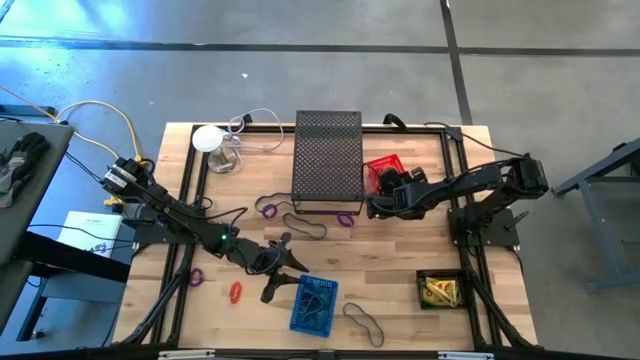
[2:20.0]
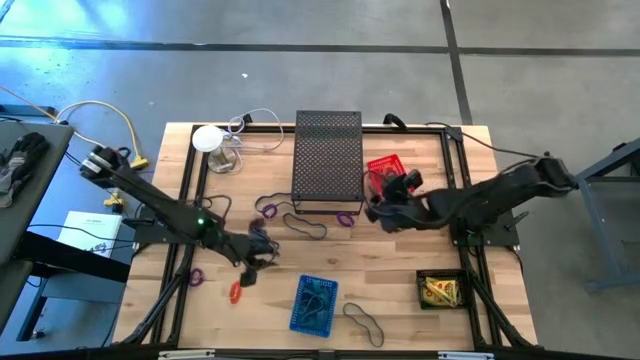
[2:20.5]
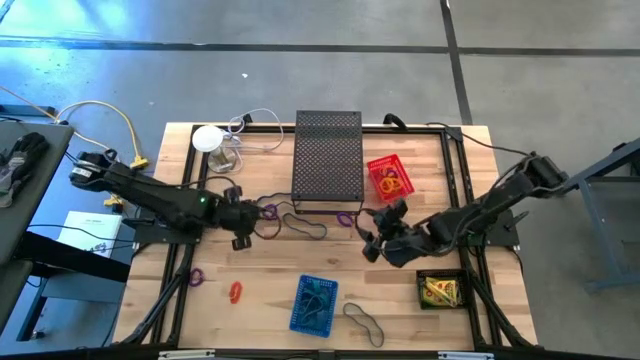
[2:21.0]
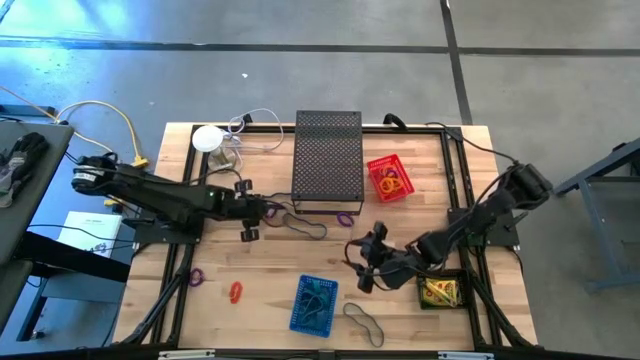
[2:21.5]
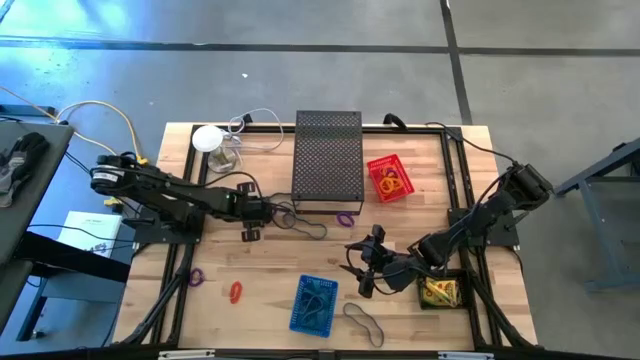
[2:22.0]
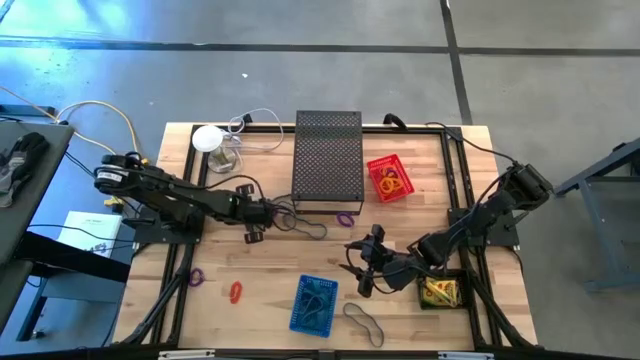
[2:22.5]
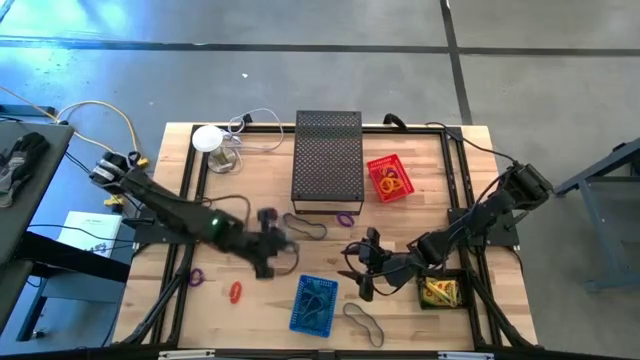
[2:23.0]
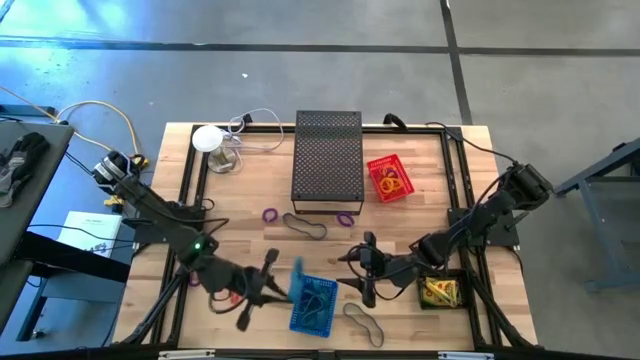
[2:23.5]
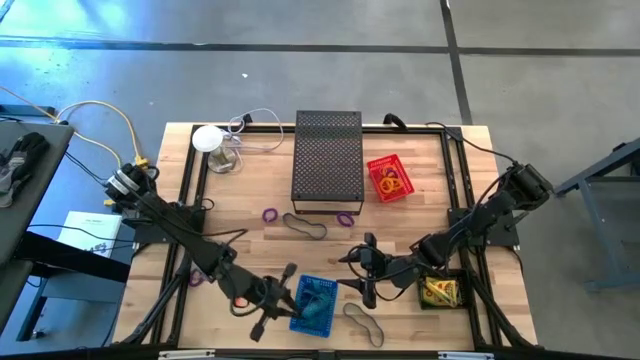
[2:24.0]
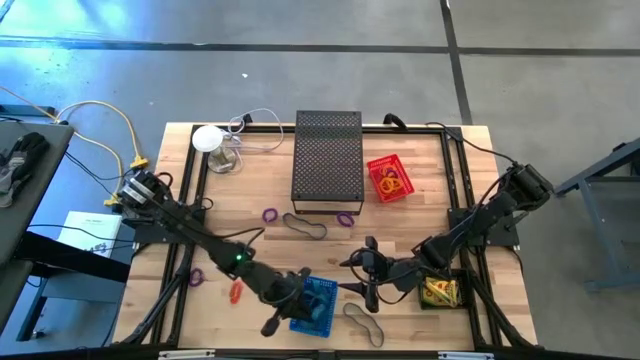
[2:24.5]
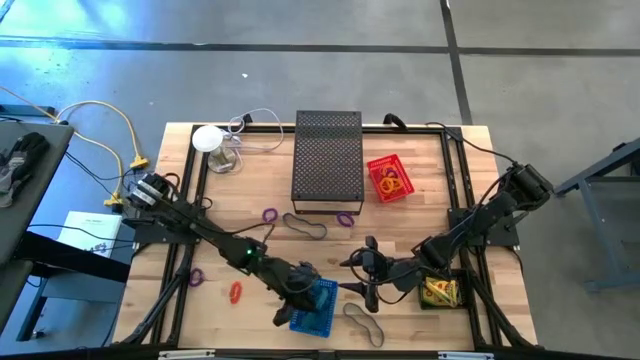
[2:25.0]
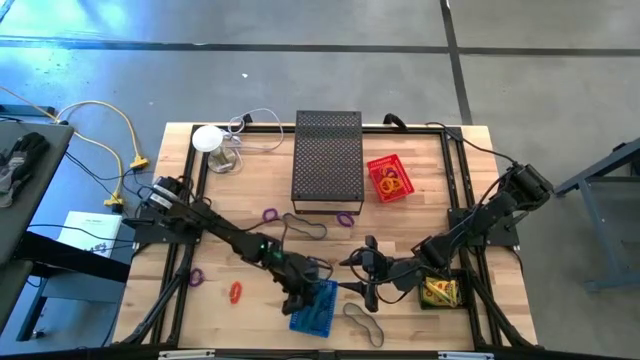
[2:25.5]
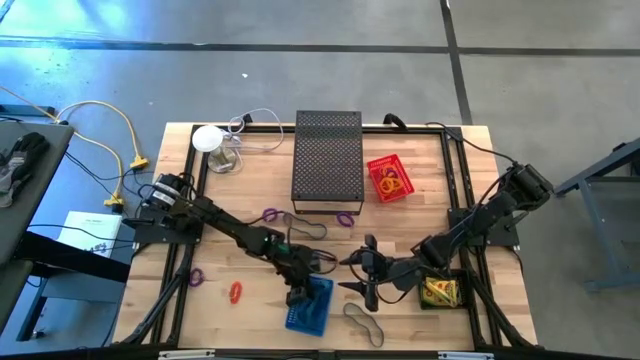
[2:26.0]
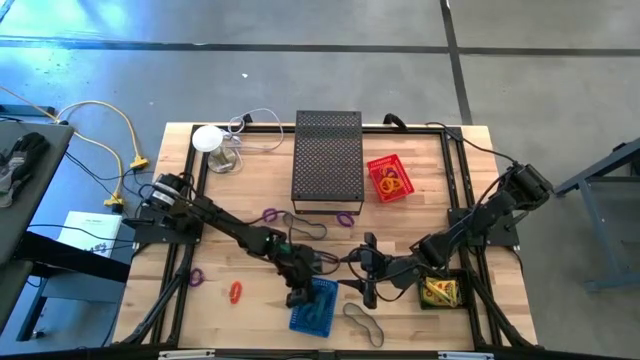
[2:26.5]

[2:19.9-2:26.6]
Task: Pick & Place Office Desk Supplies
Put the blue rubber band into the blue bin

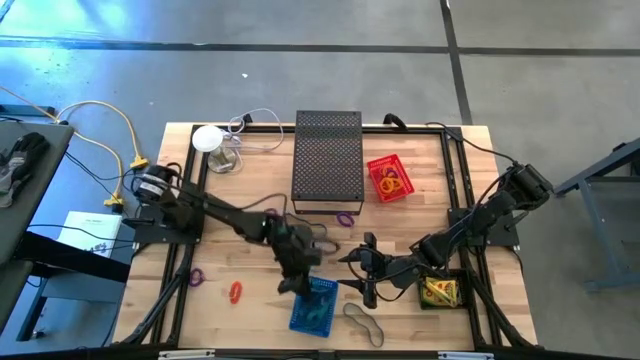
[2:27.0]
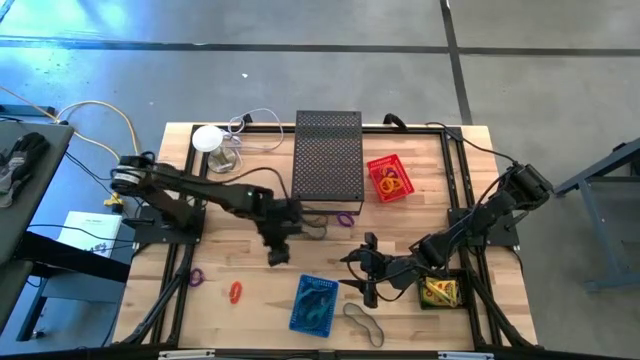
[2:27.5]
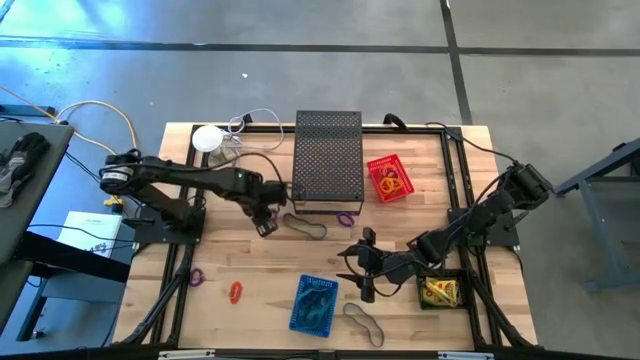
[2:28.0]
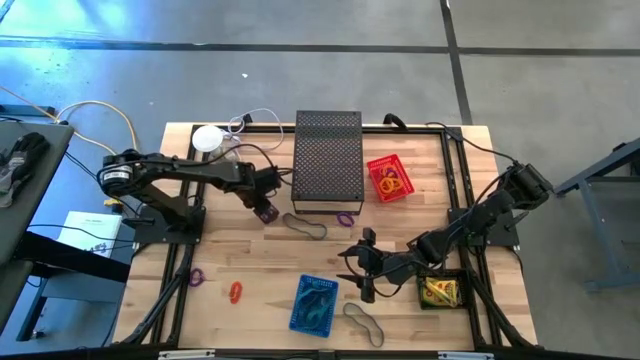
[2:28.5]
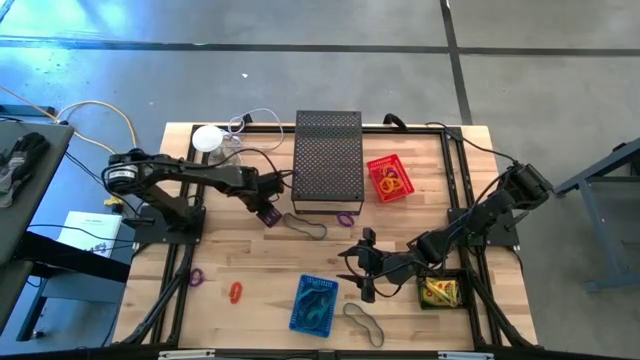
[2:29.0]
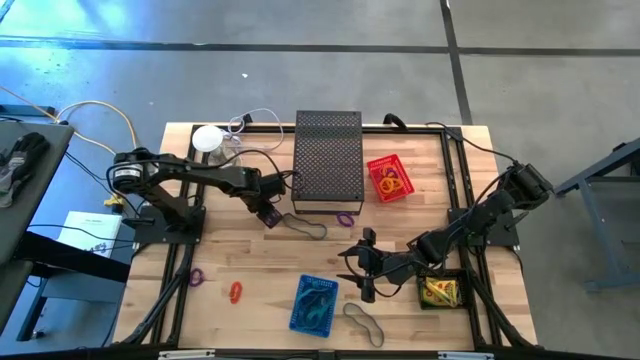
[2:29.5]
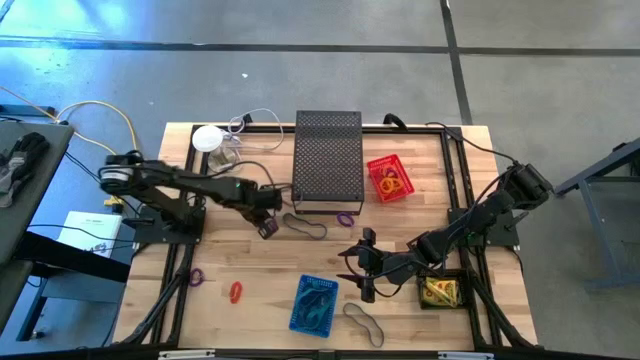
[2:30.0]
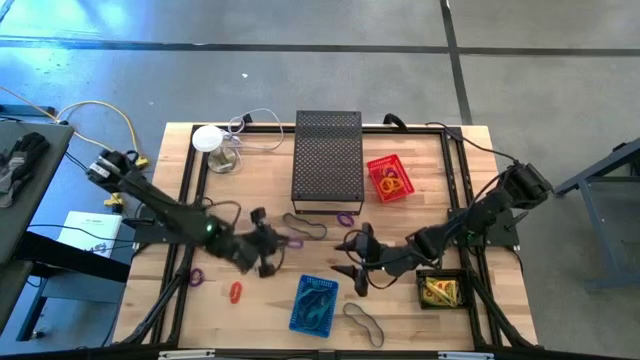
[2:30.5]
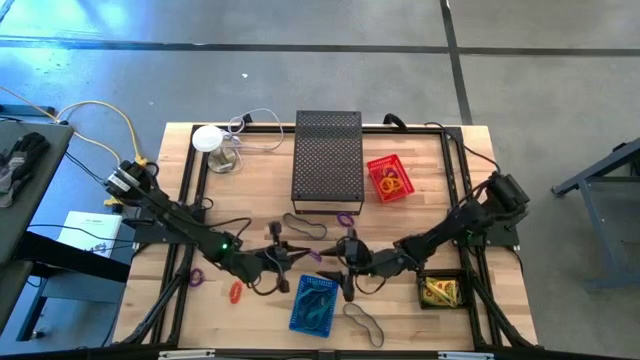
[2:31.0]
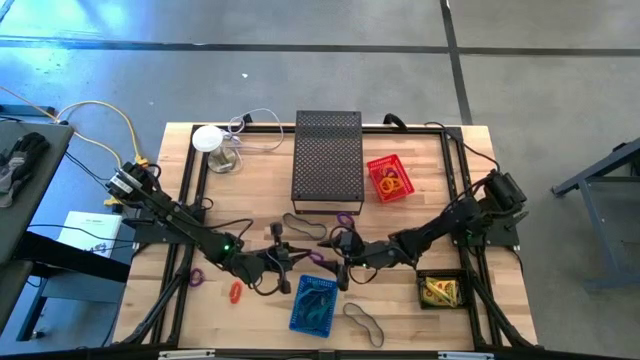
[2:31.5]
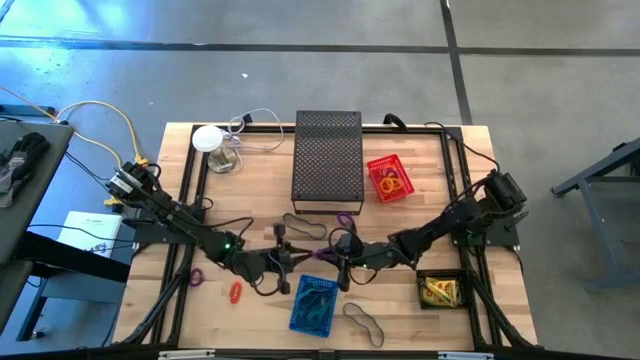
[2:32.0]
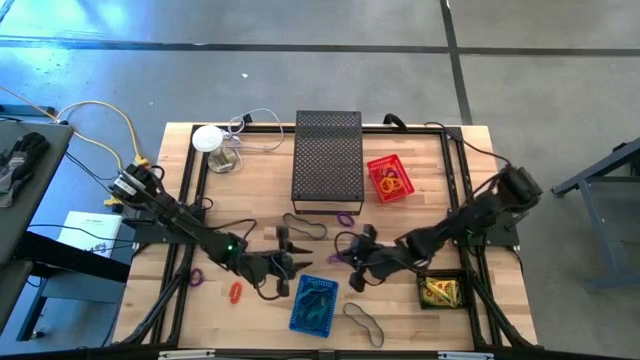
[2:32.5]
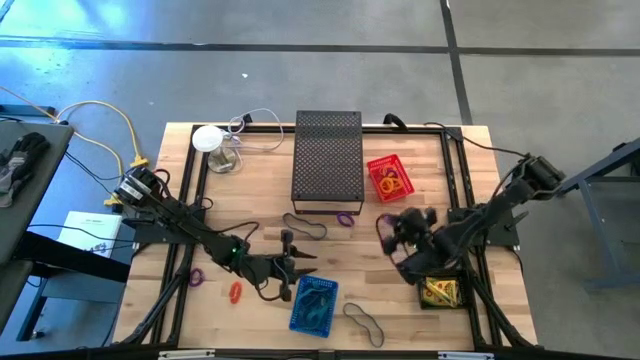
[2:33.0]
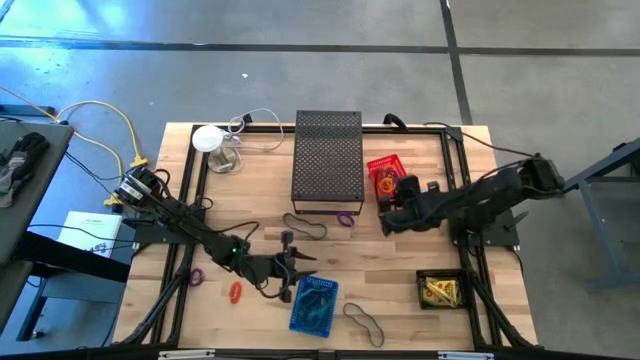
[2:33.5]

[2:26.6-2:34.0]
Put the violet spring keychain into the red bin

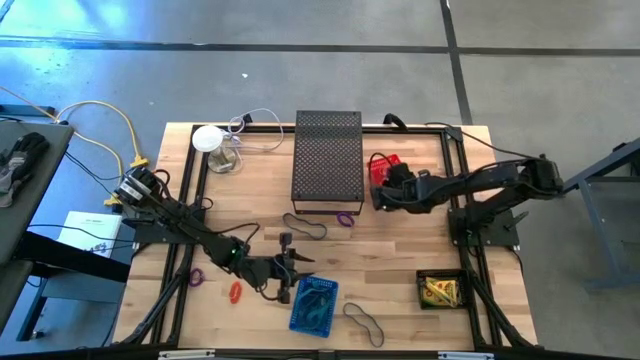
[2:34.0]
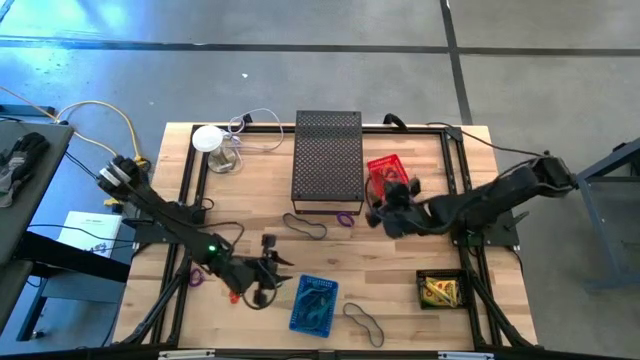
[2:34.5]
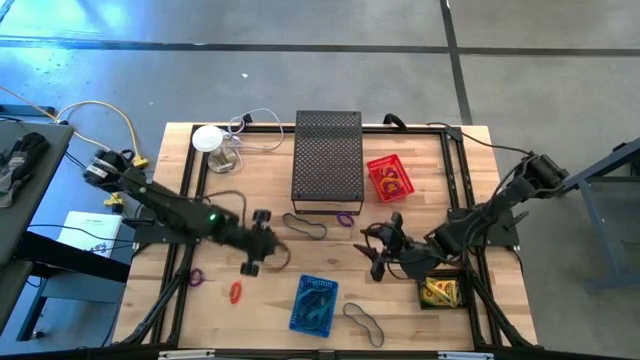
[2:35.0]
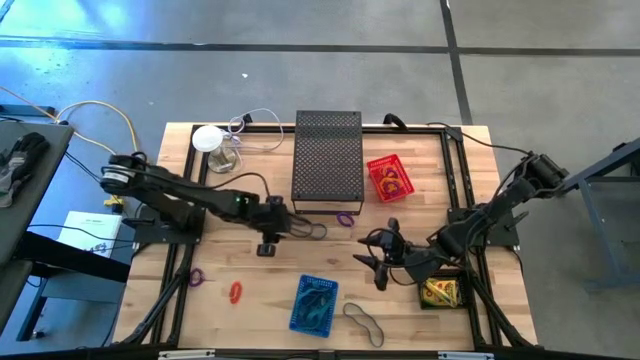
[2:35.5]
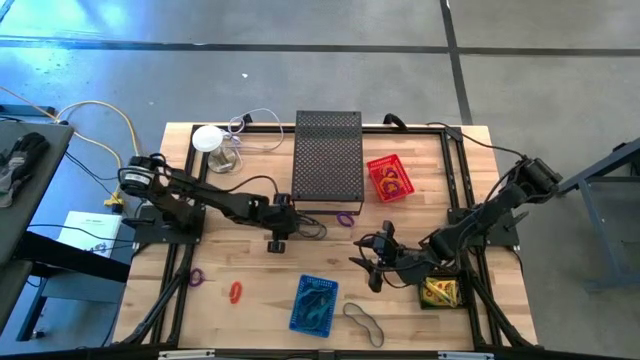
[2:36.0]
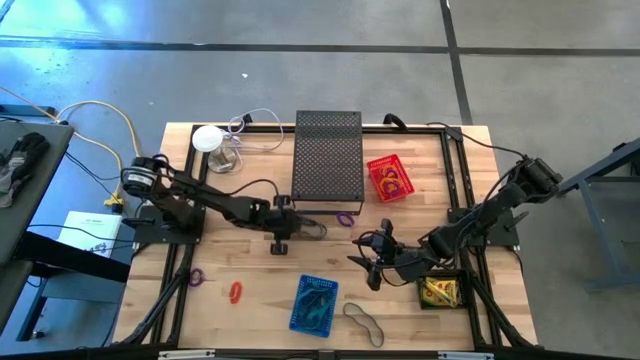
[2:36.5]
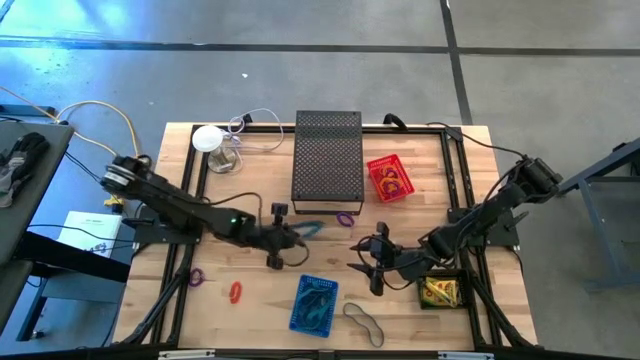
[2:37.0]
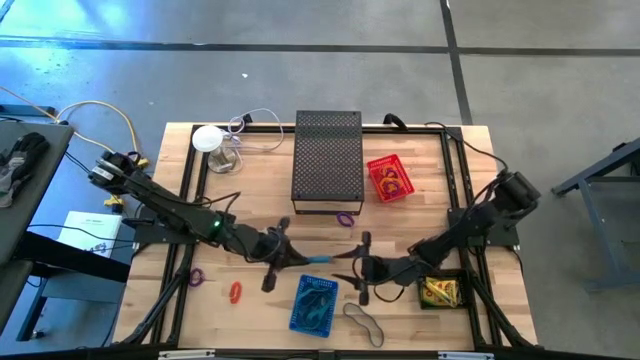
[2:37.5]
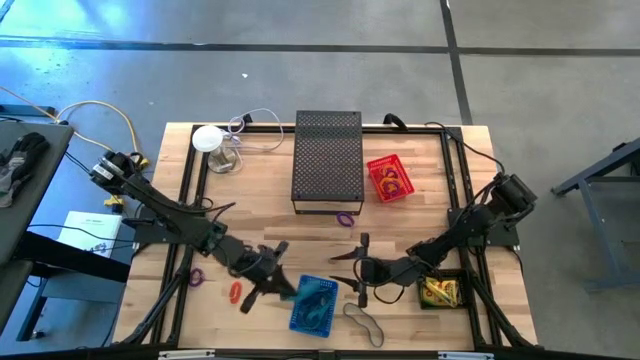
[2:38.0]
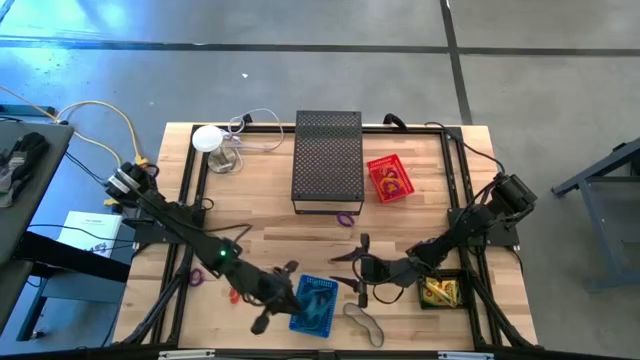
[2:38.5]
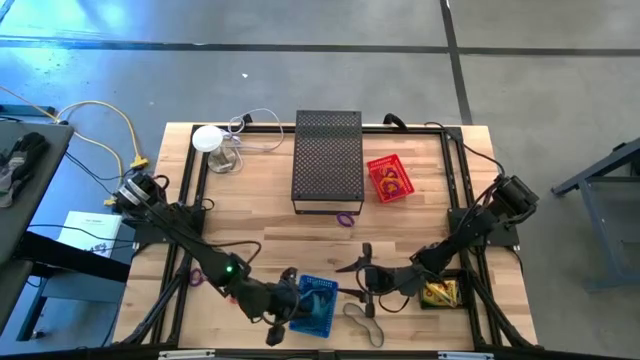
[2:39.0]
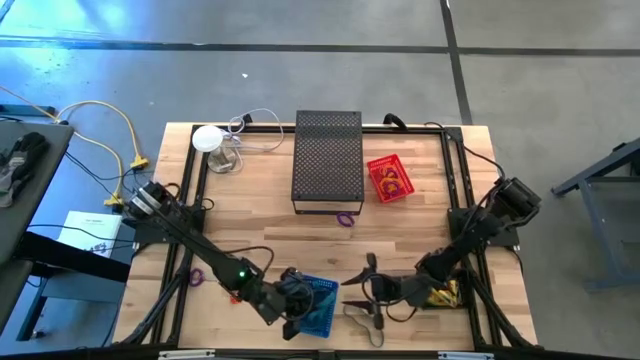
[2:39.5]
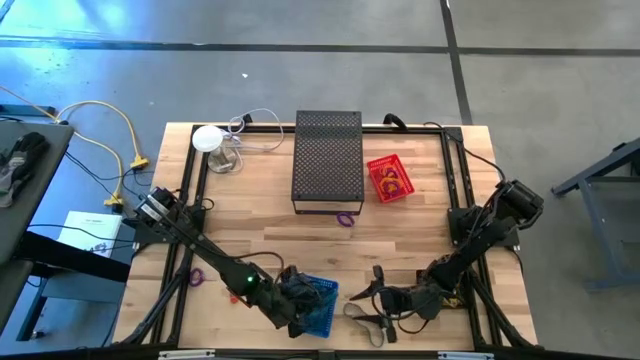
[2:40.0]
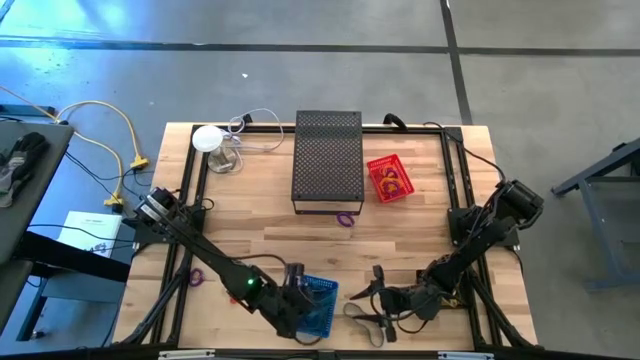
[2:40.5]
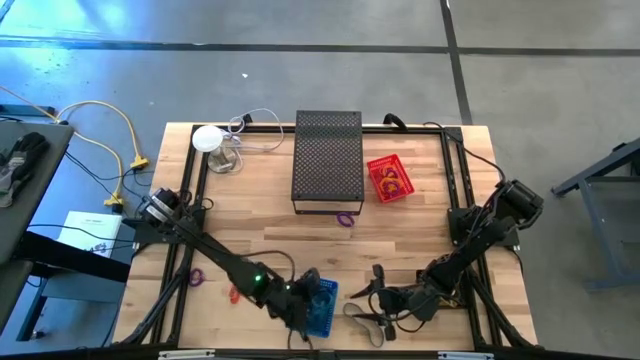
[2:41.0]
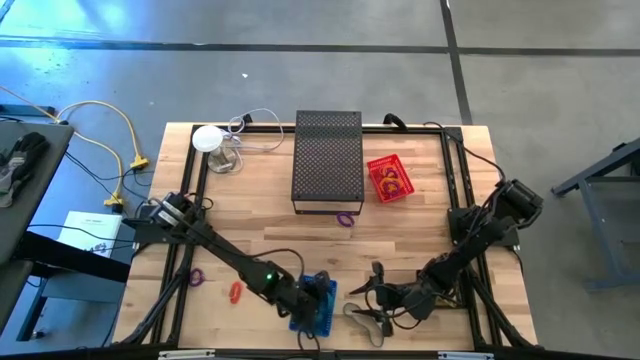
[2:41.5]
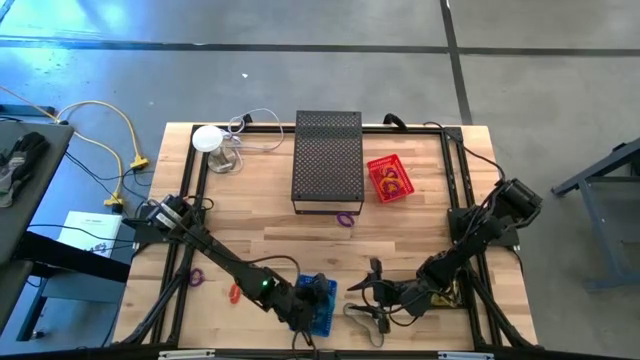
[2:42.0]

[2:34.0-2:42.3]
Put the blue rubber band into the blue bin
